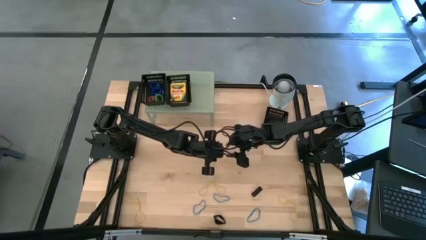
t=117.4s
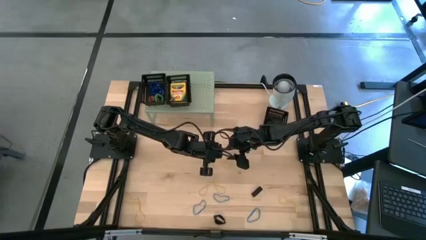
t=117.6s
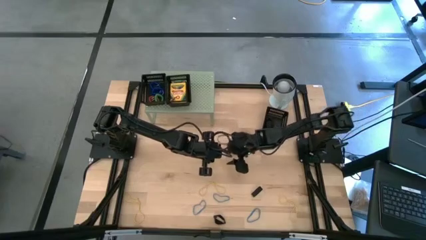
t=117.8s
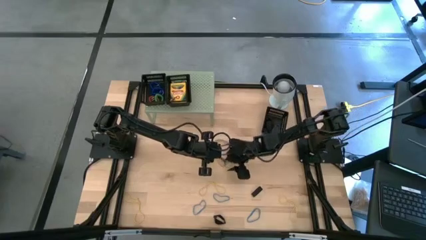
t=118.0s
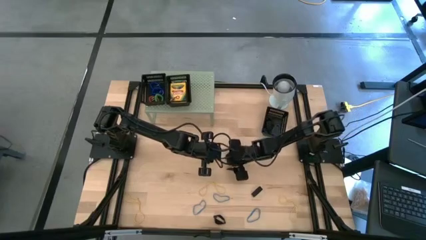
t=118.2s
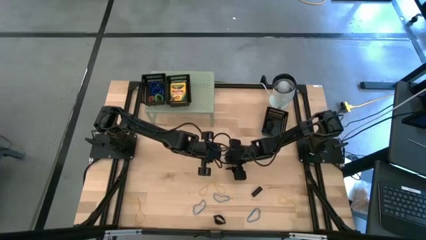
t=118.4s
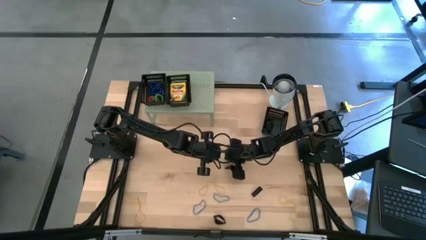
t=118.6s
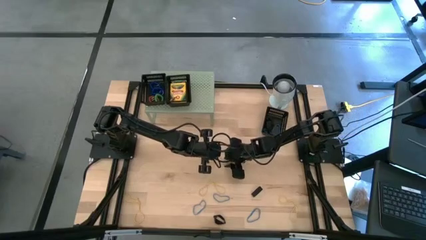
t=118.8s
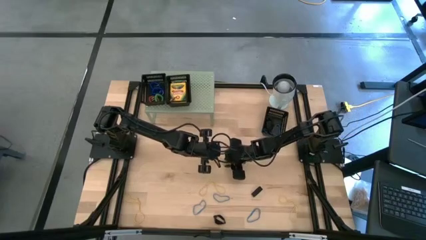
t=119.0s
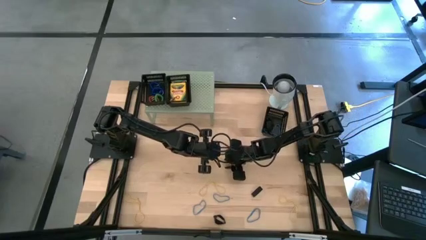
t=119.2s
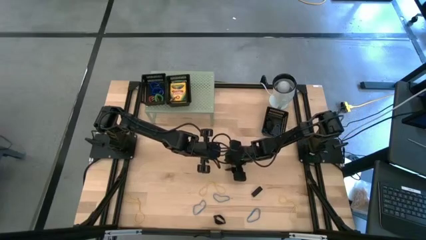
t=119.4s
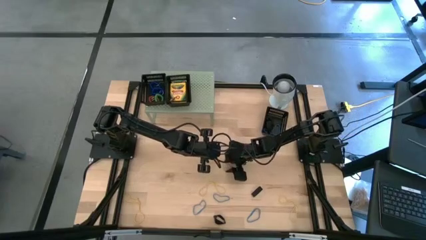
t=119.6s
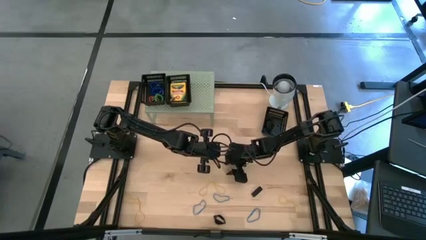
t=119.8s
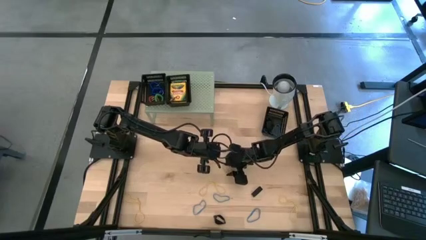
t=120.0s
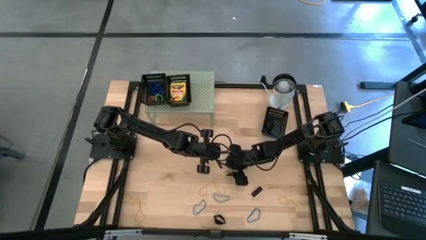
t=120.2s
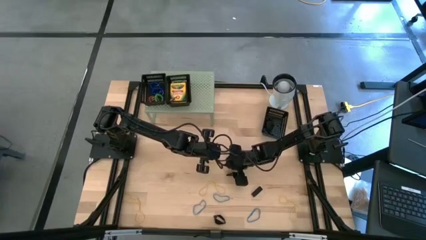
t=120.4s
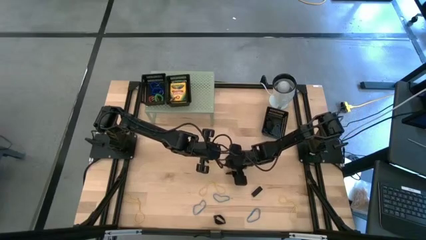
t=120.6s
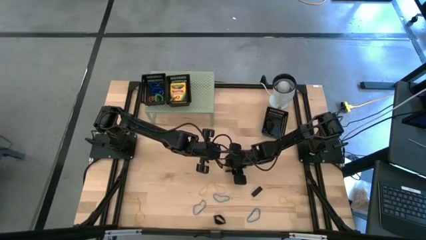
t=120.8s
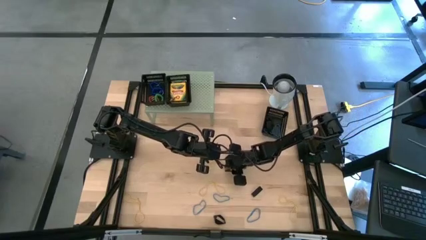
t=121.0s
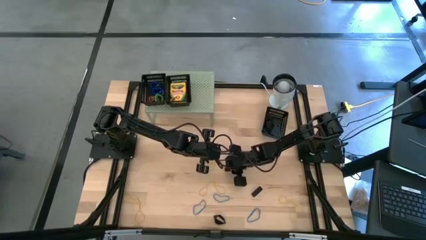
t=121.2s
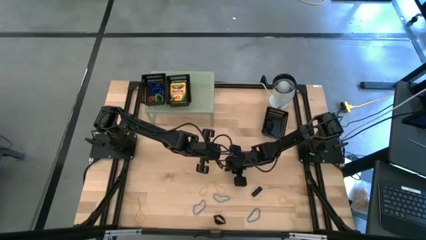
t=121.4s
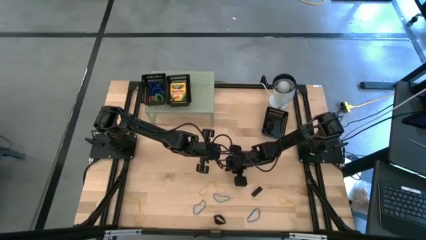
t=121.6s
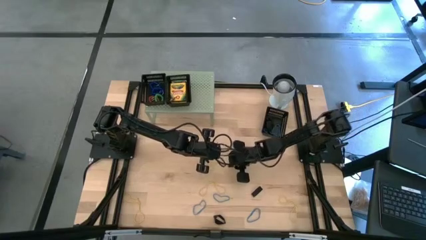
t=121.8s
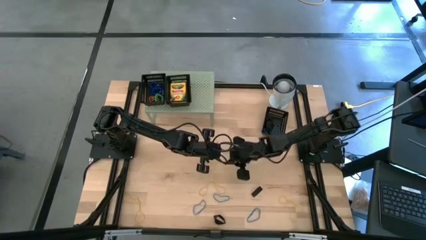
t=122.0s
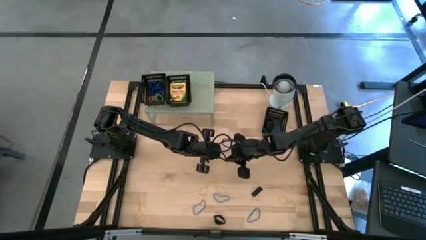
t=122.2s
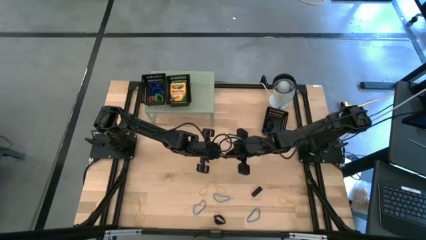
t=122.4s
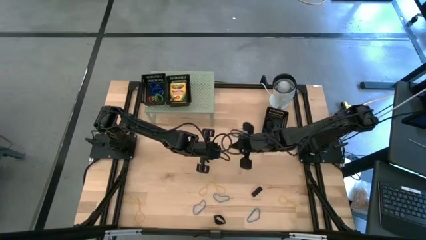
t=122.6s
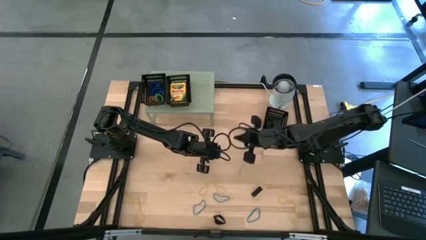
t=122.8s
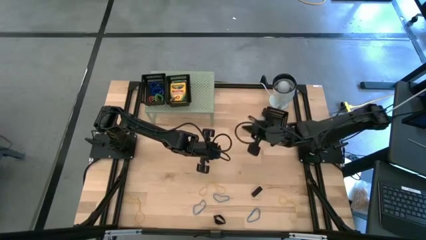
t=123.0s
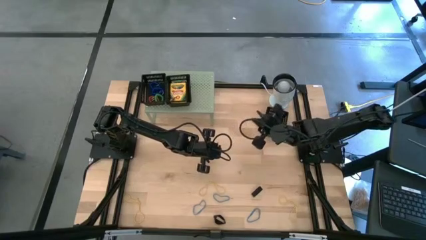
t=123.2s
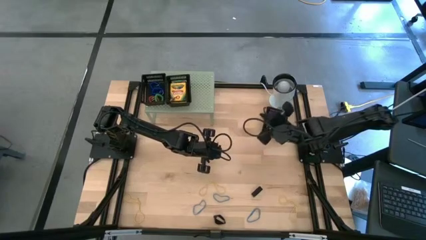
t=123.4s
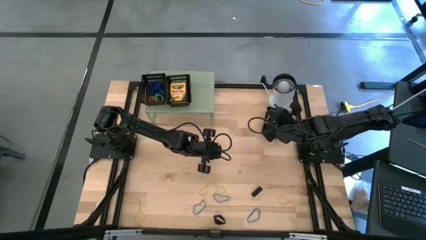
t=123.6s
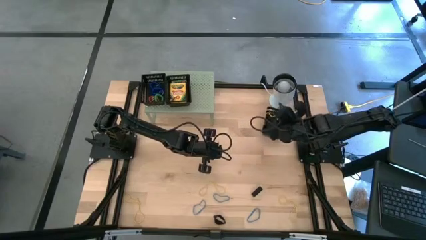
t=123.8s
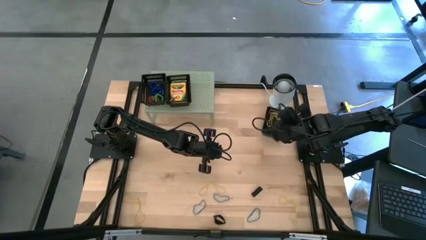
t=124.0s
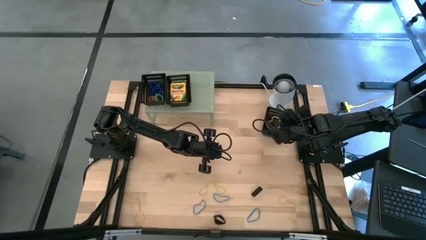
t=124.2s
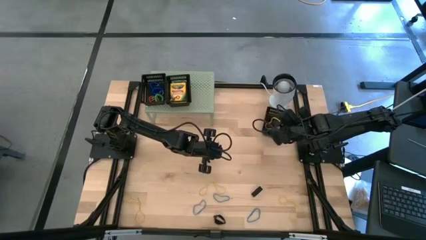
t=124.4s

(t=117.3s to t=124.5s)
Task: Pick & Place Office Desk Supplies
Put the yellow rubber band into the black bin

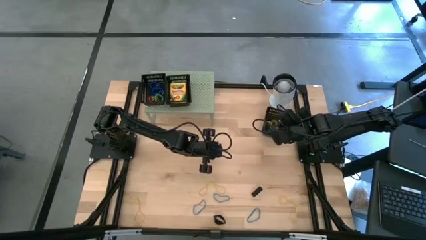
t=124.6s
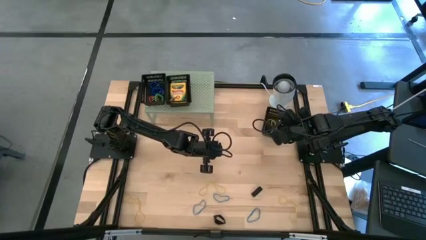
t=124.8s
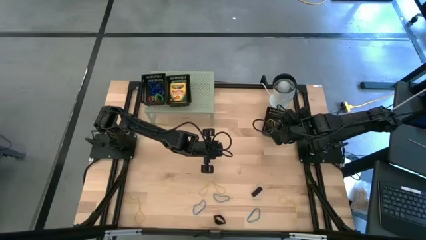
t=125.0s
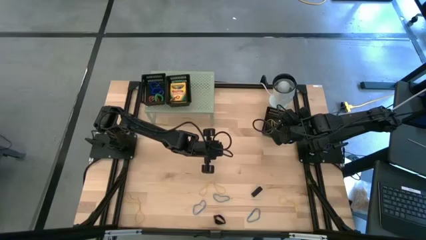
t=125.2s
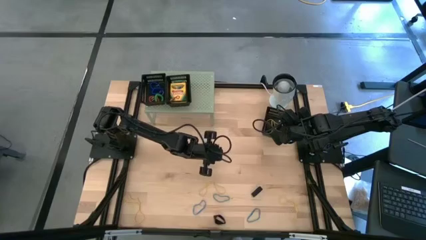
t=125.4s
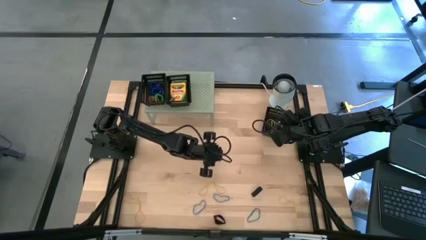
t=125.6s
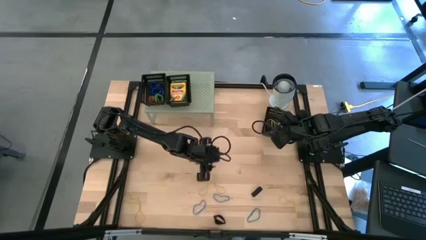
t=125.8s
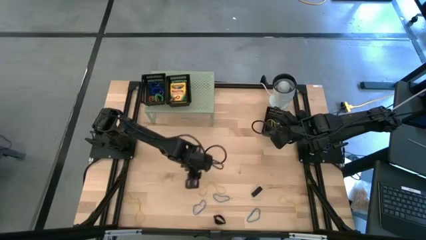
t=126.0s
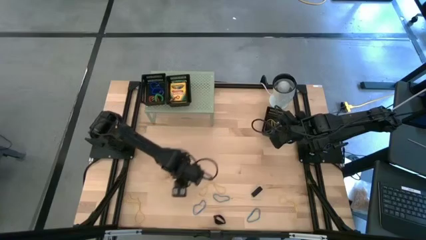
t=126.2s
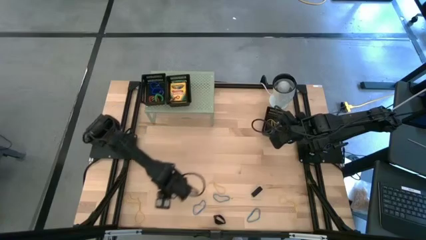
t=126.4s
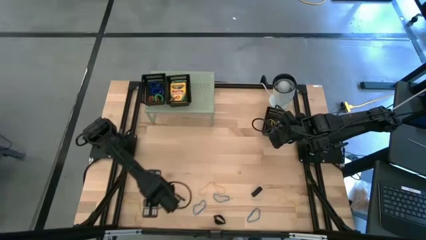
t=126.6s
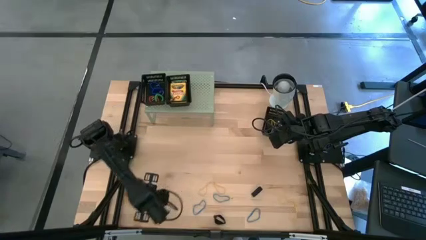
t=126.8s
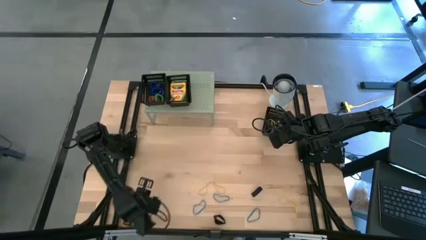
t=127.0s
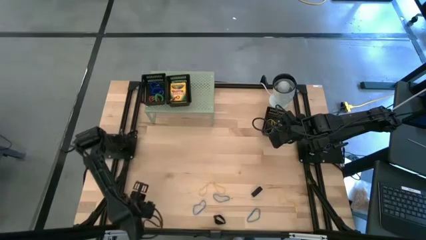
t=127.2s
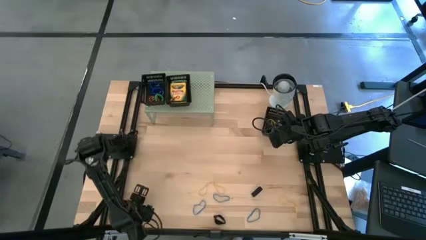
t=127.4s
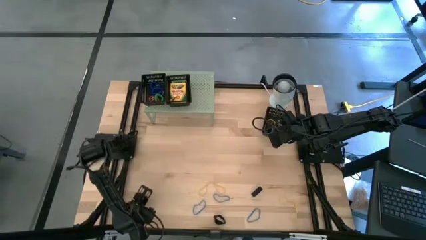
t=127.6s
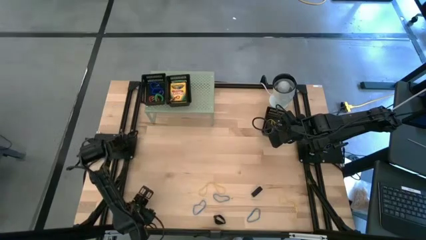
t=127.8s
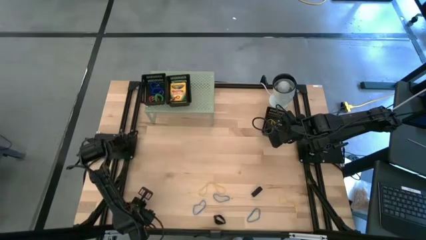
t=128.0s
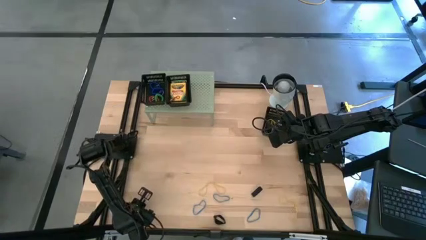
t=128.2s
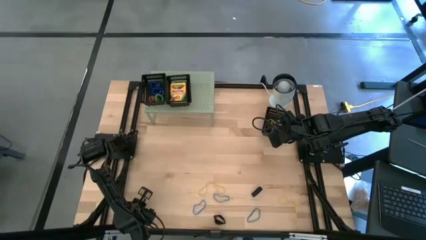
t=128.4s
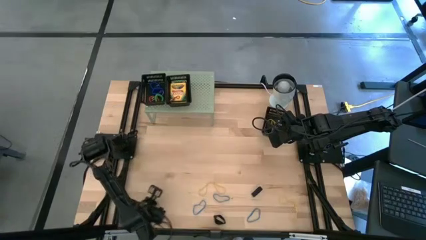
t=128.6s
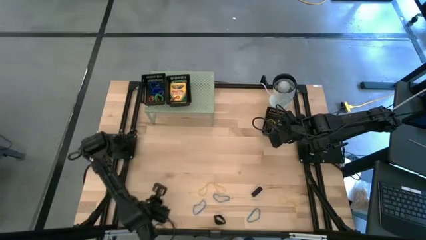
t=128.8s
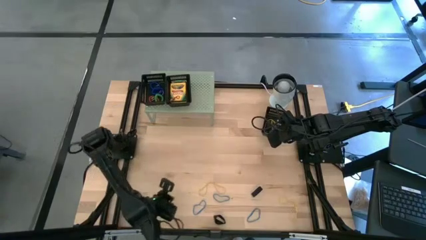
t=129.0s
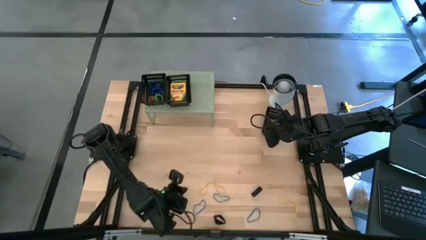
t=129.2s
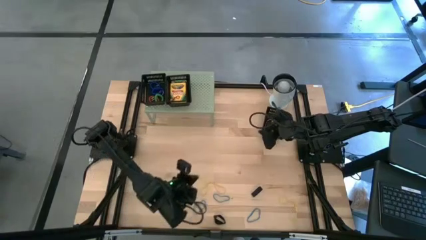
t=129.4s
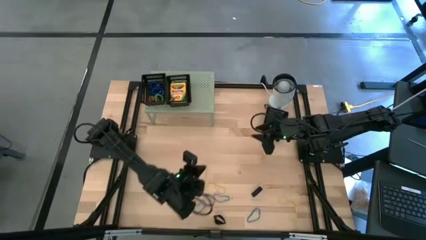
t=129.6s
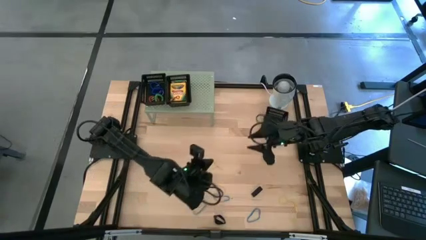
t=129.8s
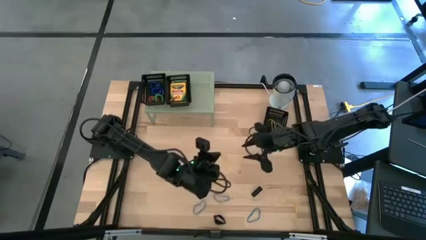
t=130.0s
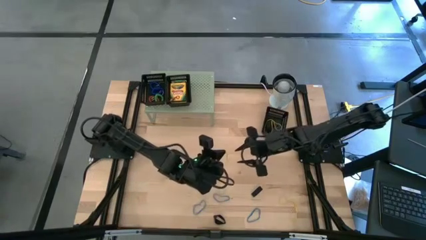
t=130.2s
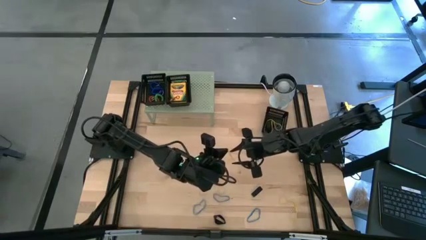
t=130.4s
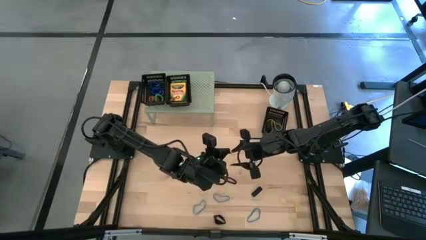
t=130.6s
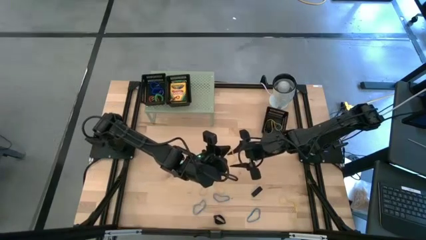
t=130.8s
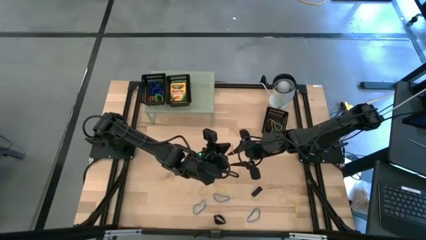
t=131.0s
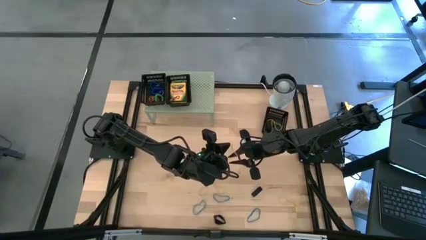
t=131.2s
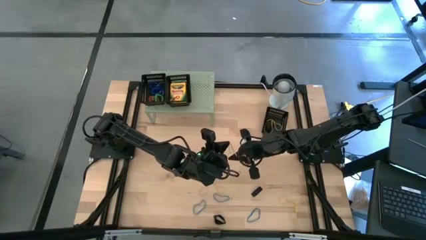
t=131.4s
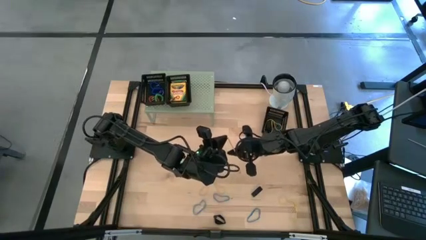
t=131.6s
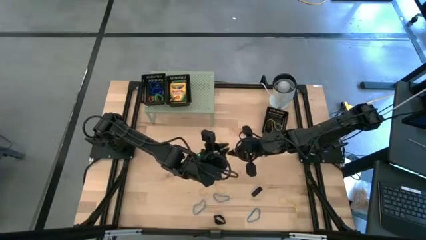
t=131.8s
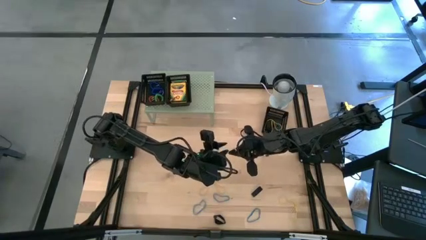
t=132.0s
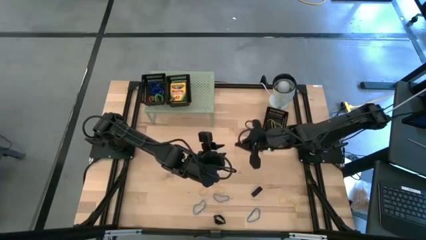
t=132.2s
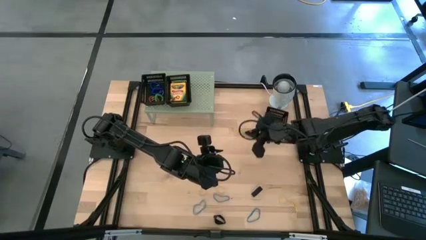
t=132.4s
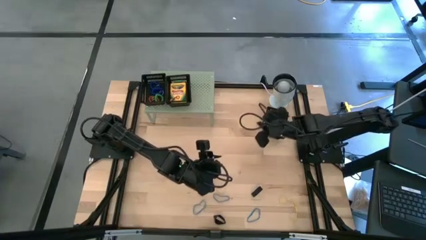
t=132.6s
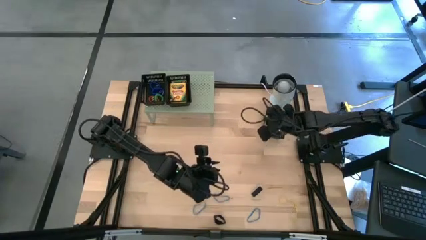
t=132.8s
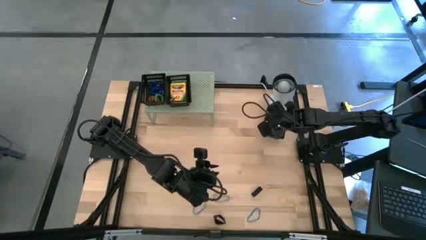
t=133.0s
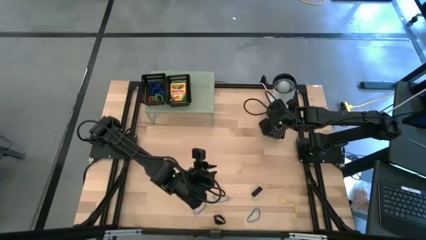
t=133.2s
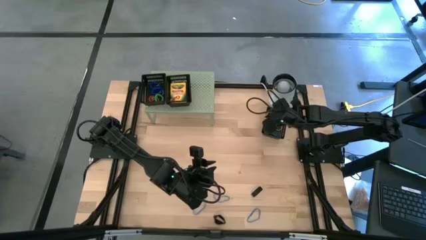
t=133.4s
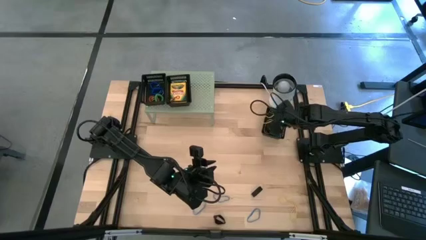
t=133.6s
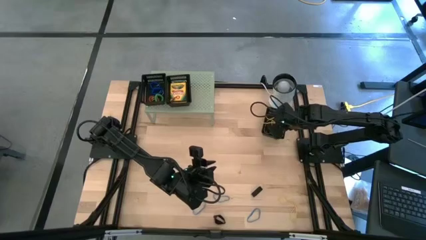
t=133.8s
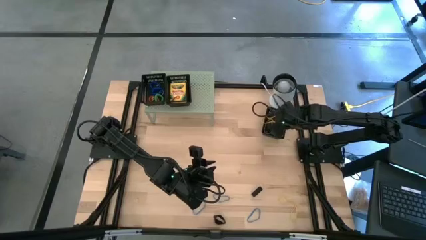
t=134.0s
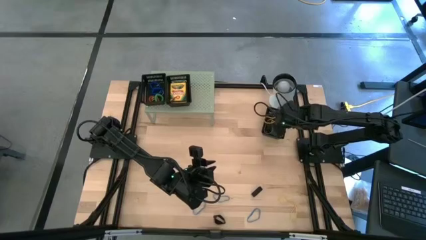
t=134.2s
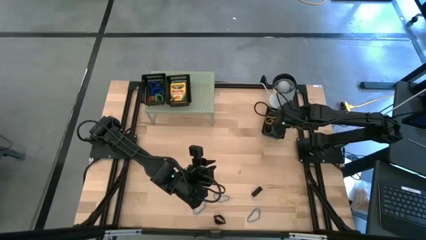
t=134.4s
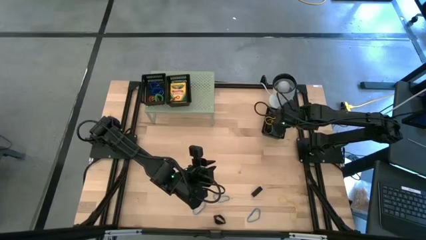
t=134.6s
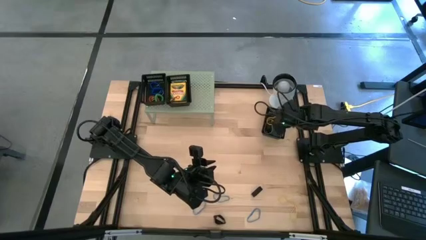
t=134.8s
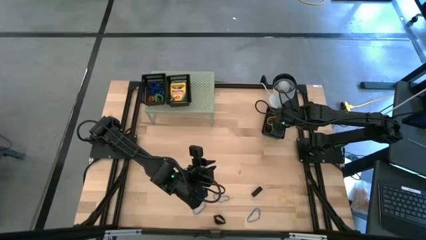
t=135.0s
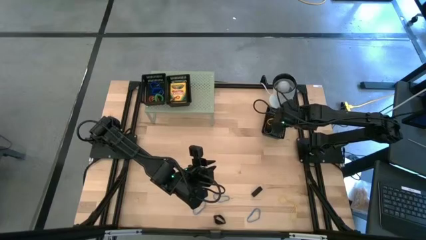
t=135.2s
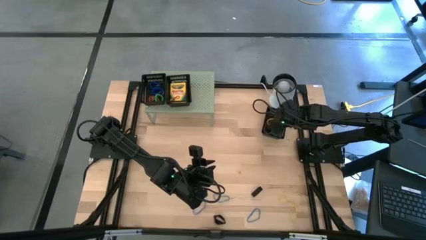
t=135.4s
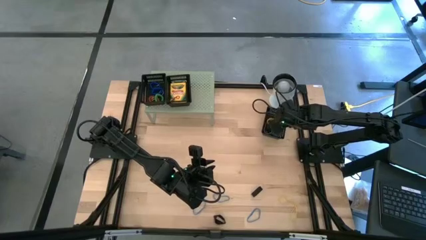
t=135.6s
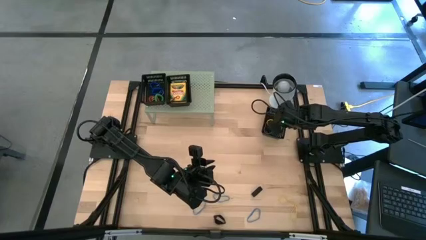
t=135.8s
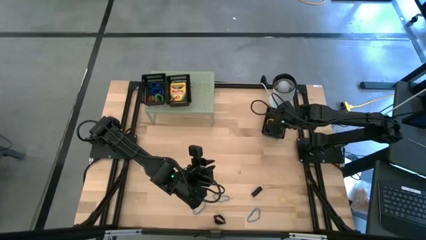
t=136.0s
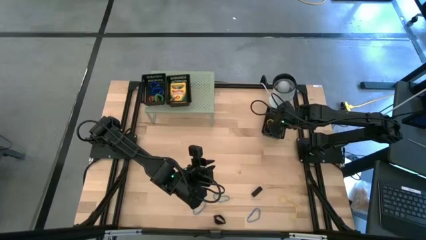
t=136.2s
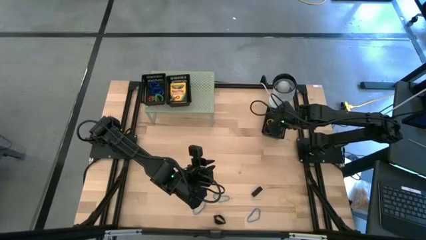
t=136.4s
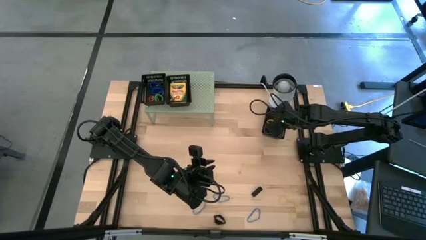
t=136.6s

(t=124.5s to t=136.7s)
Put the yellow rubber band into the black bin
